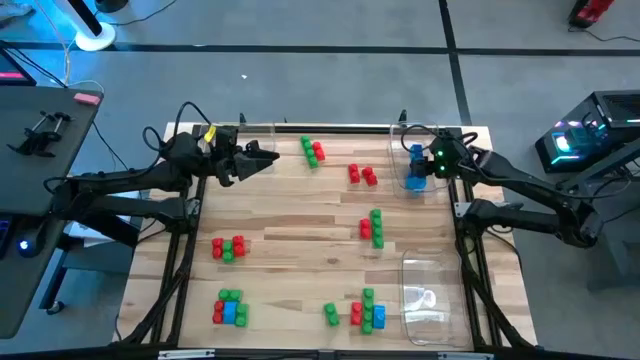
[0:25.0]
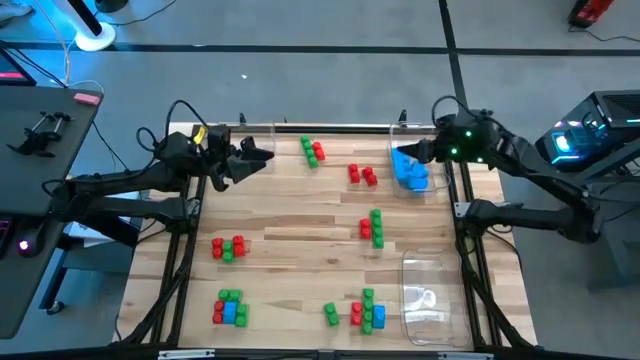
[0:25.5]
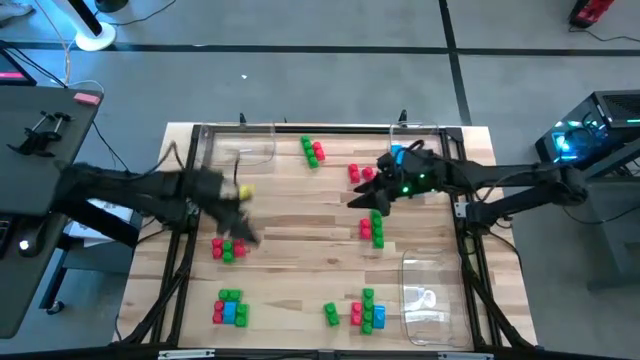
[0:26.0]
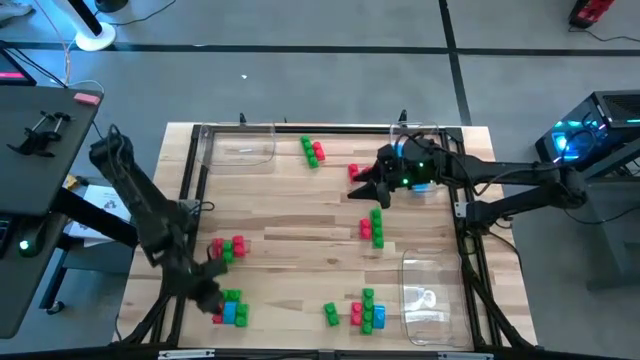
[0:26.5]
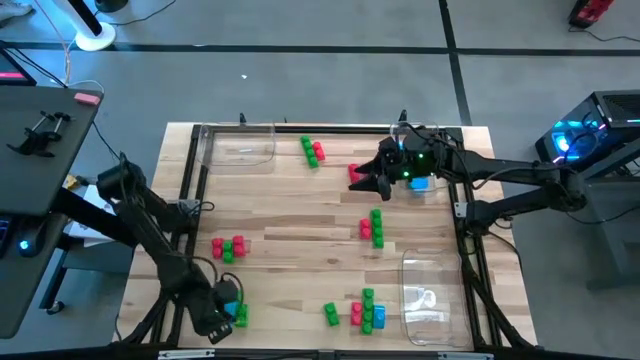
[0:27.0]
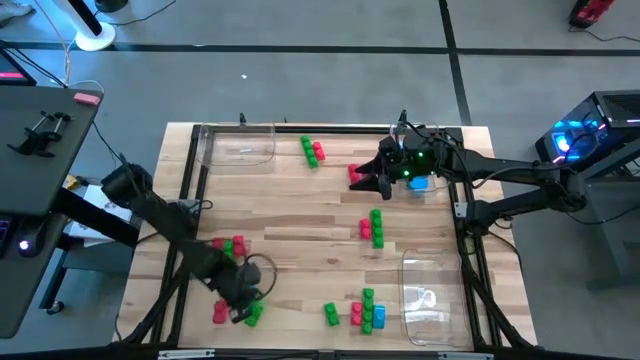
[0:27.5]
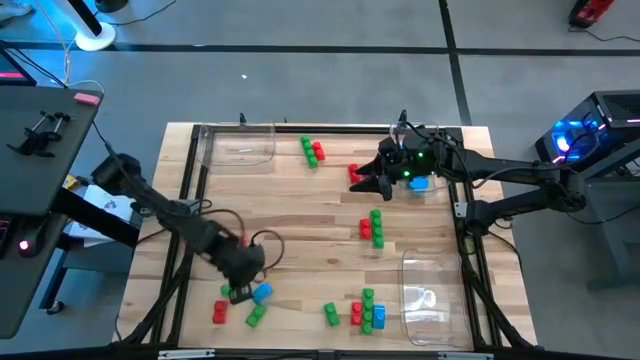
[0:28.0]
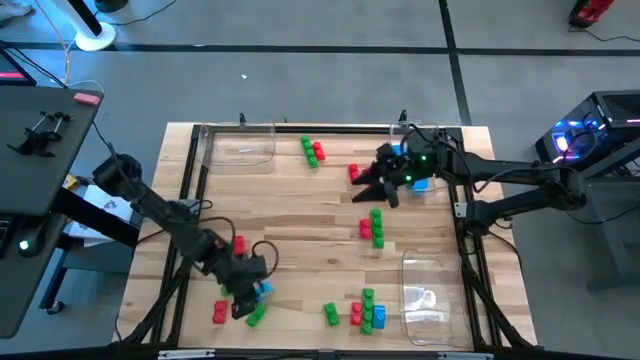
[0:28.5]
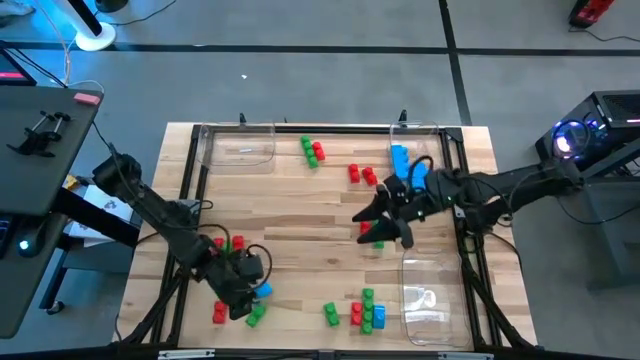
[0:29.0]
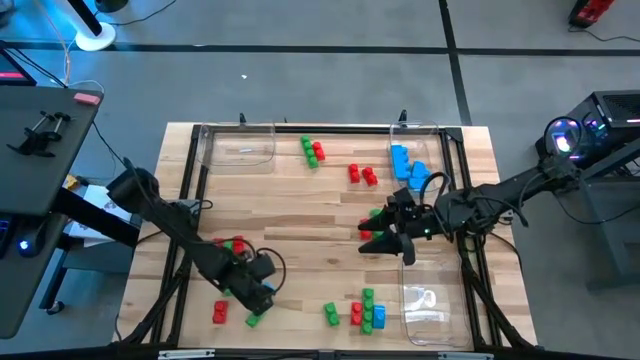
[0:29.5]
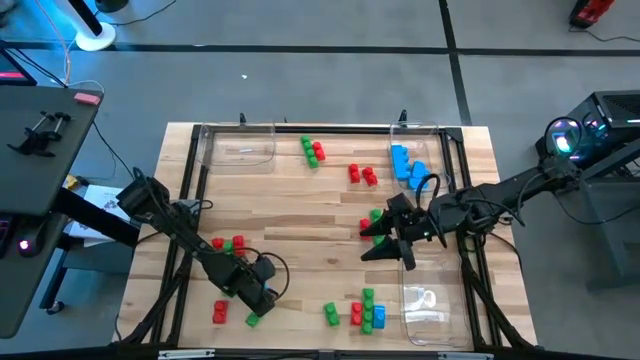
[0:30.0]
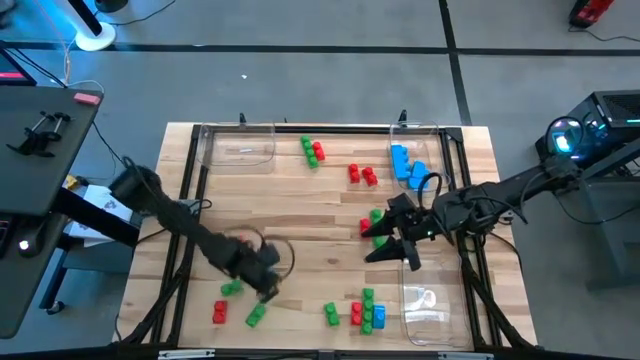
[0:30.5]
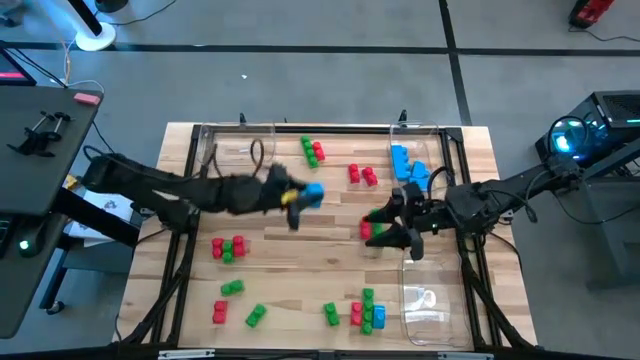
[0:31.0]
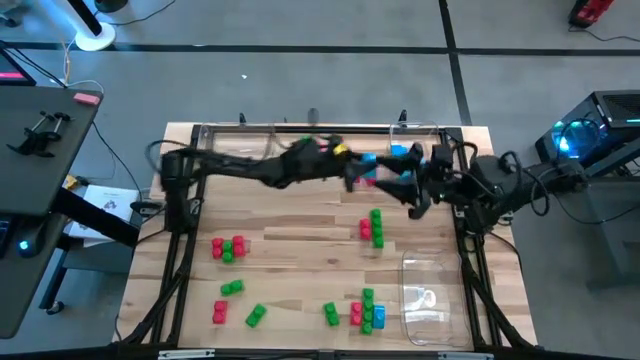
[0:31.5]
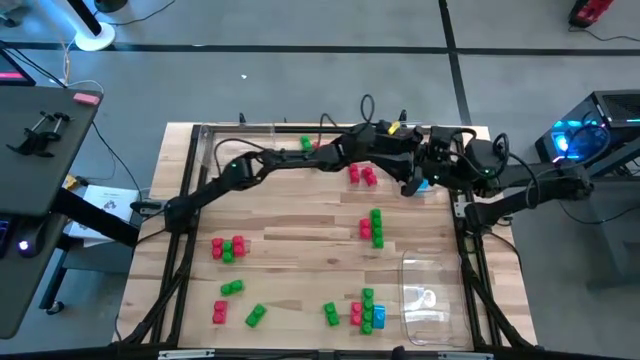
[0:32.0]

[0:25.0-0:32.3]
Task: Sort blocks
Put the blue game piece into the top right transparent bin

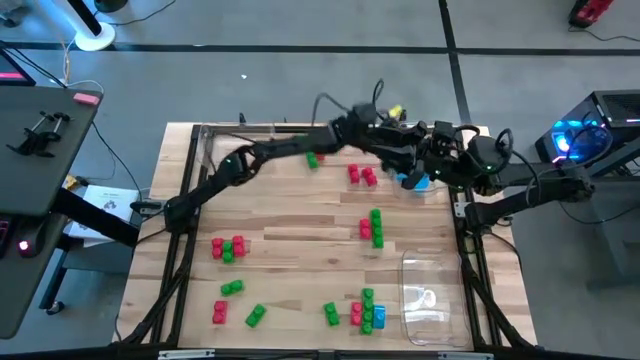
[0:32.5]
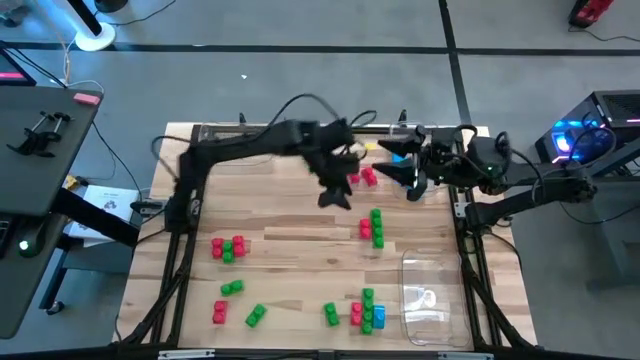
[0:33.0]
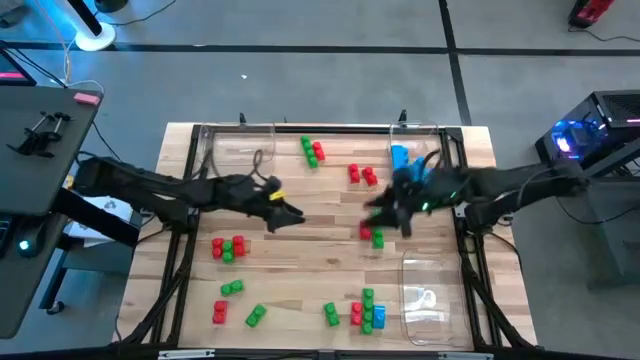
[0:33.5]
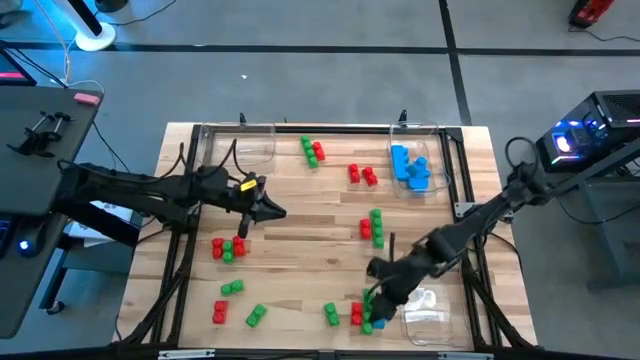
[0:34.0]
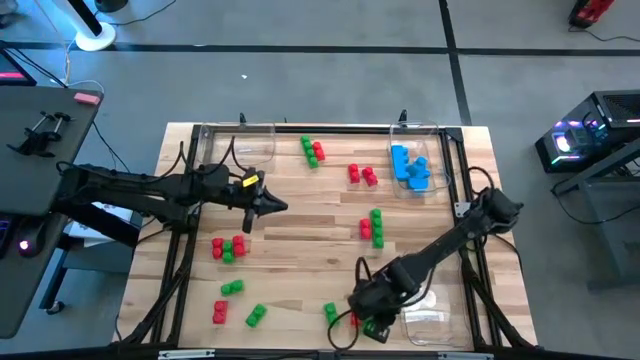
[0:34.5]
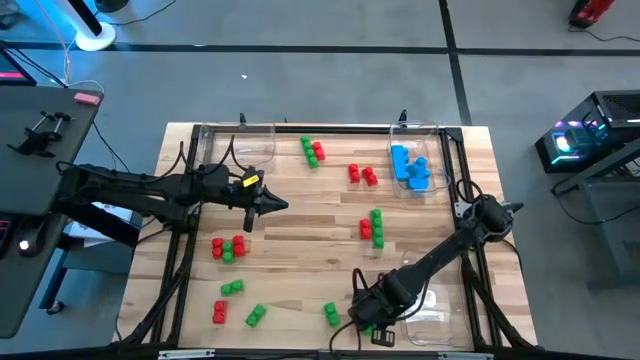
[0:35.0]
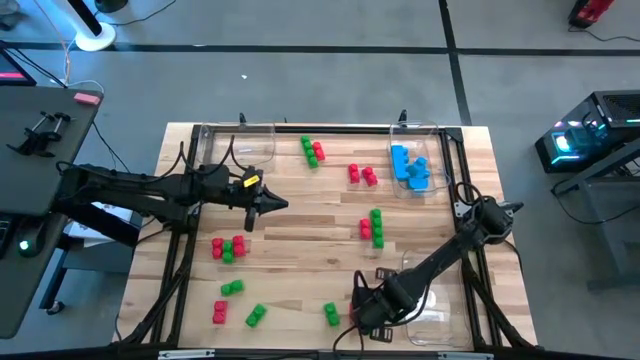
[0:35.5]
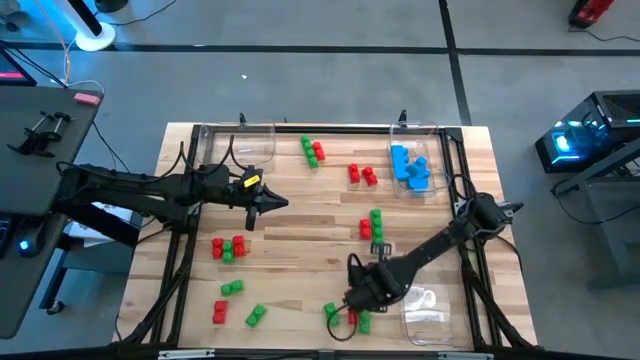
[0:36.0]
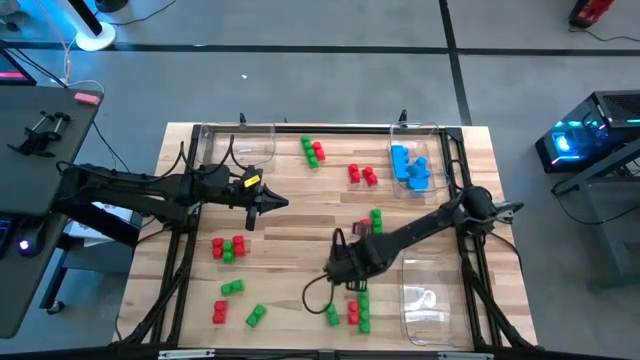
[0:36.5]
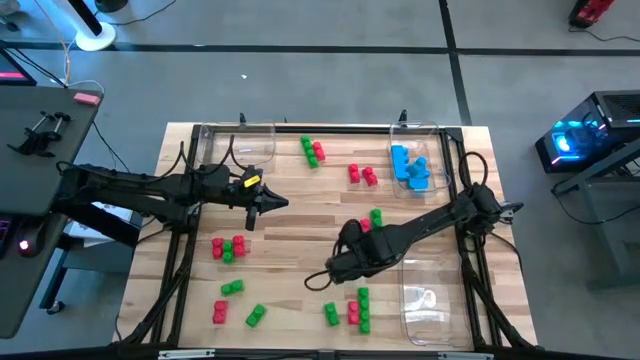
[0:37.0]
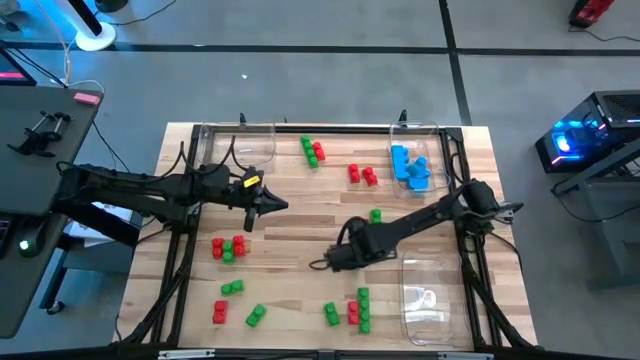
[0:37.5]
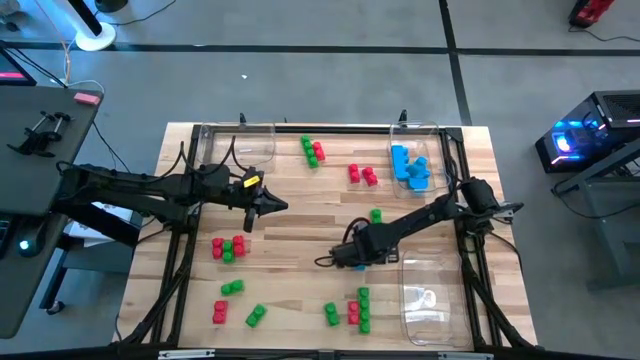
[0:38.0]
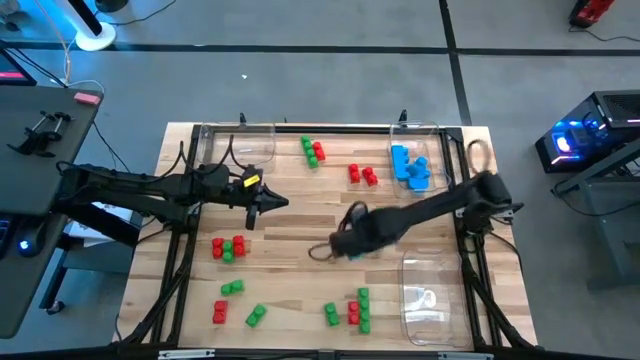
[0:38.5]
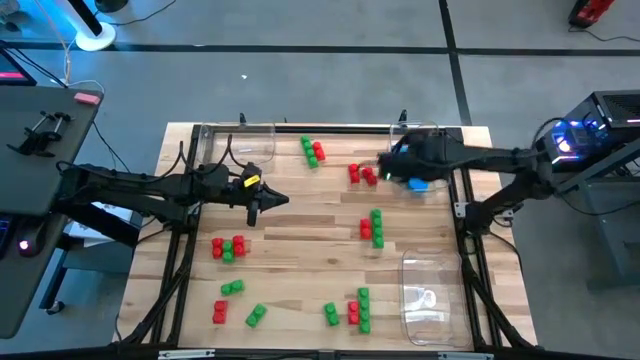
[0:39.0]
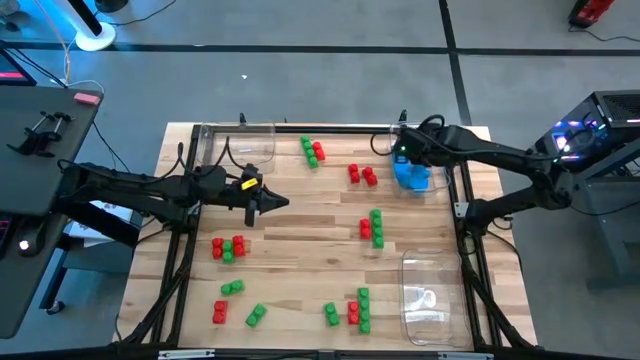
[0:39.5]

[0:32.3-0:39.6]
Put the blue game piece into the top right transparent bin

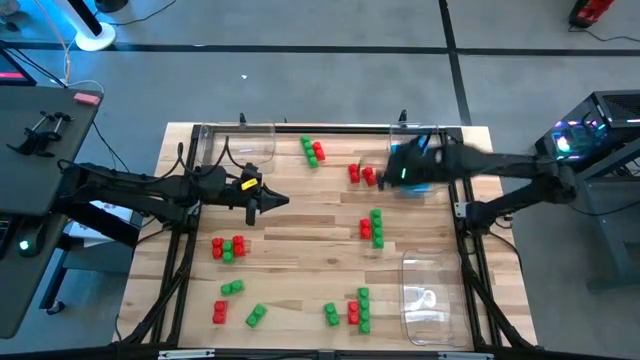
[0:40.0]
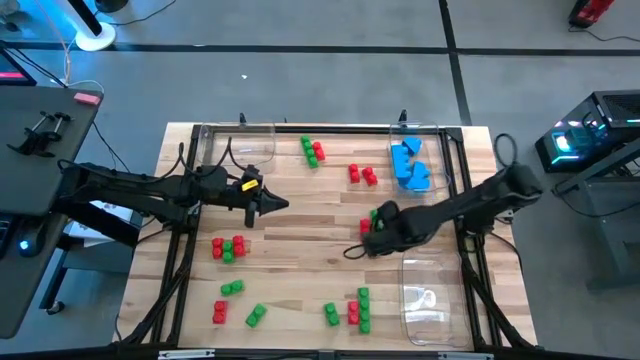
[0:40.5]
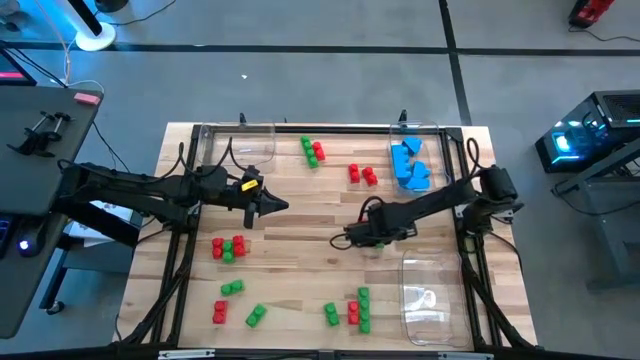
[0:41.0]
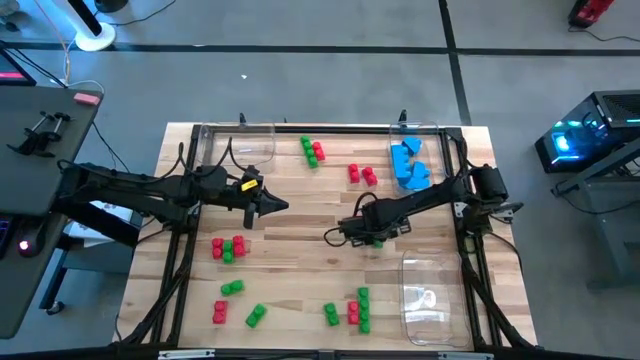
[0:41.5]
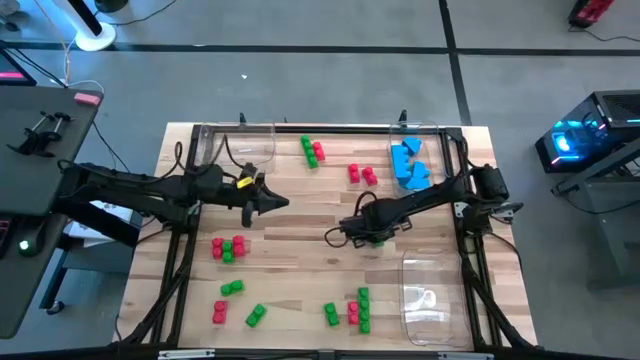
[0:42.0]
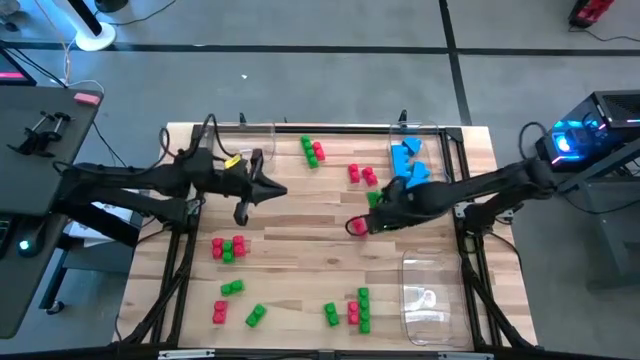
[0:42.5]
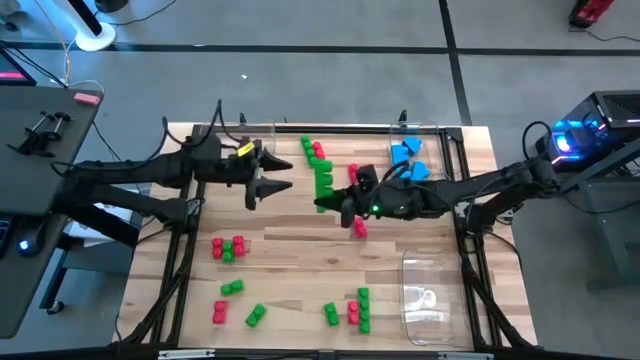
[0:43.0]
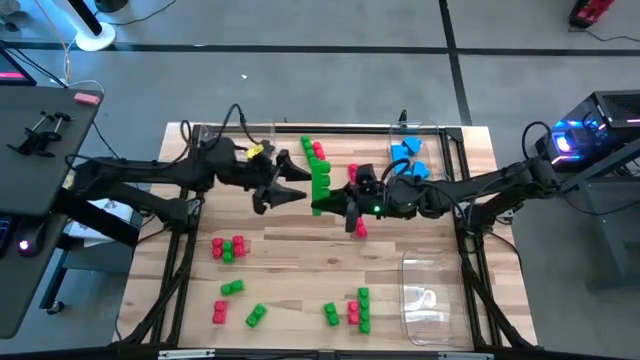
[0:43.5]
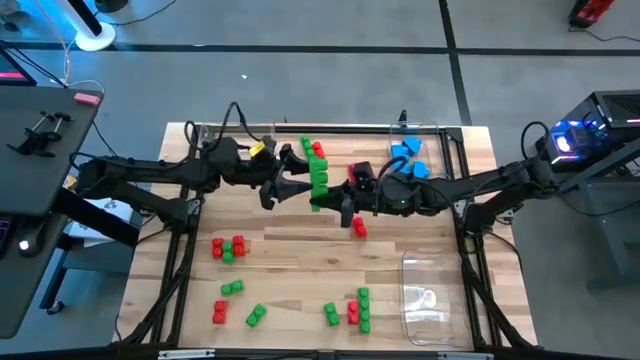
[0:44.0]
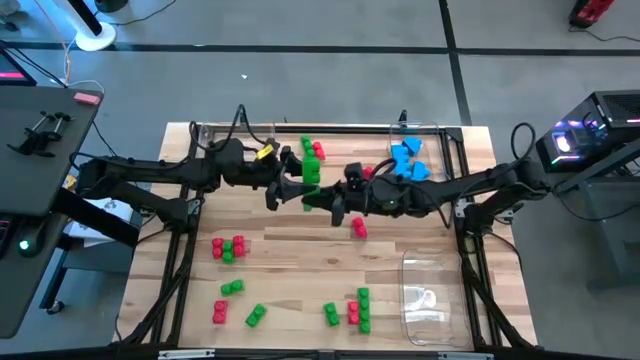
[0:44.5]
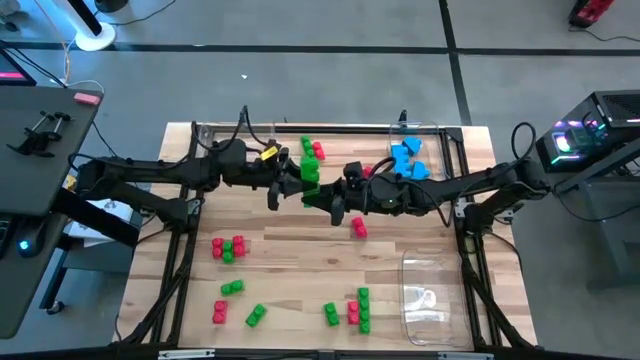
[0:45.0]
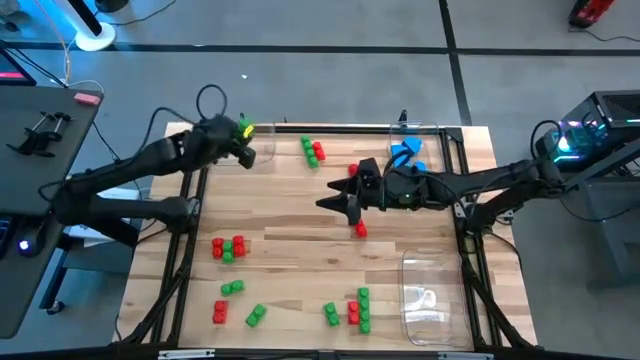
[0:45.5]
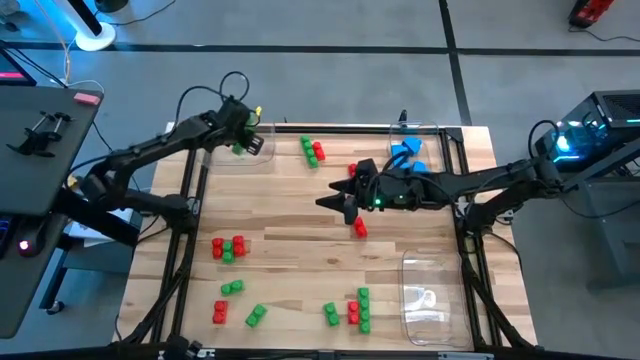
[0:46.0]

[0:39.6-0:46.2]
Put the green game piece into the top left transparent bin
